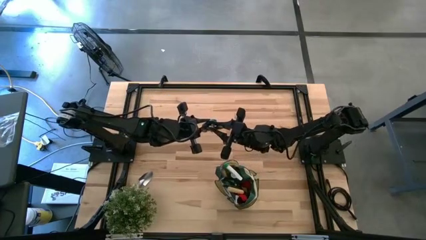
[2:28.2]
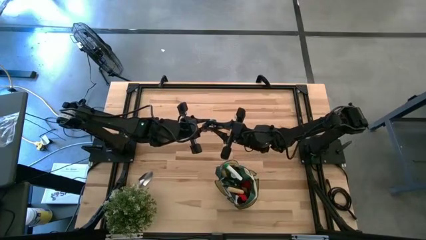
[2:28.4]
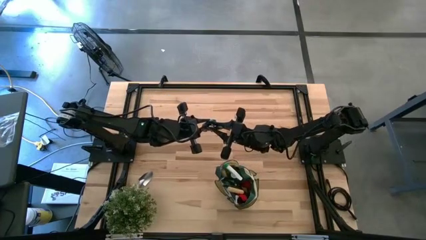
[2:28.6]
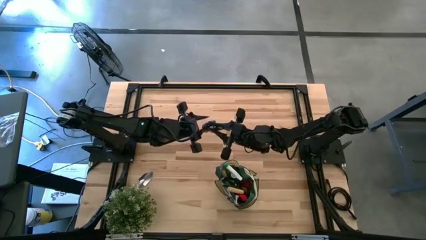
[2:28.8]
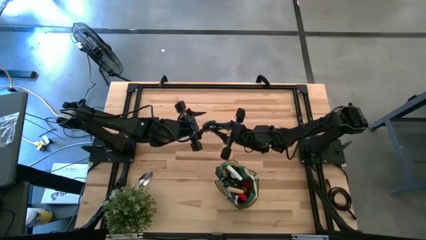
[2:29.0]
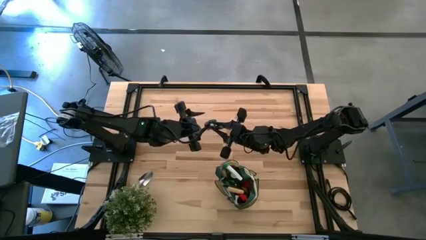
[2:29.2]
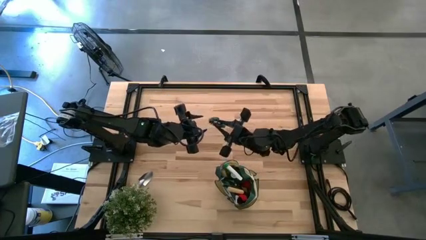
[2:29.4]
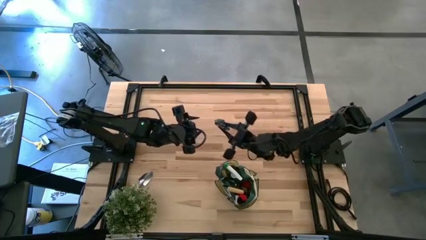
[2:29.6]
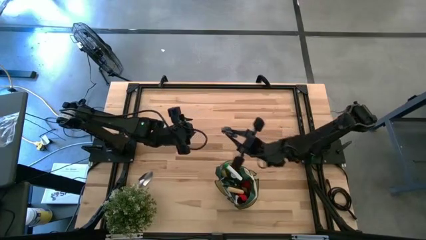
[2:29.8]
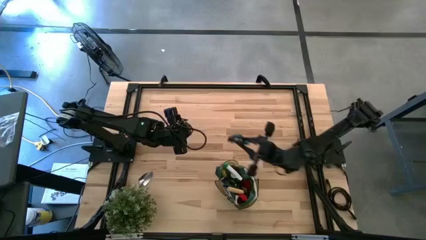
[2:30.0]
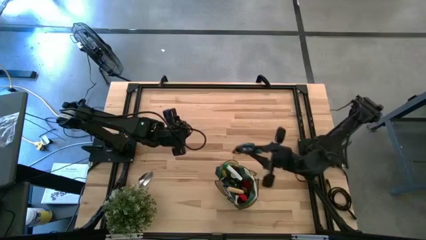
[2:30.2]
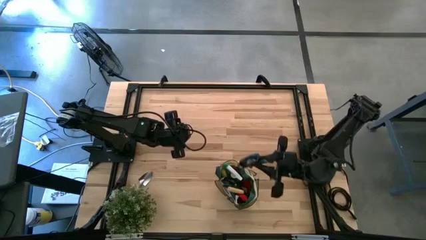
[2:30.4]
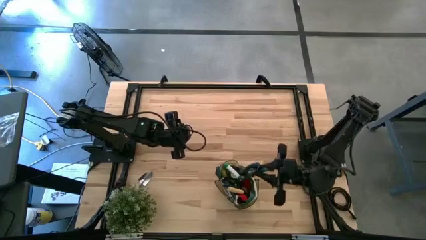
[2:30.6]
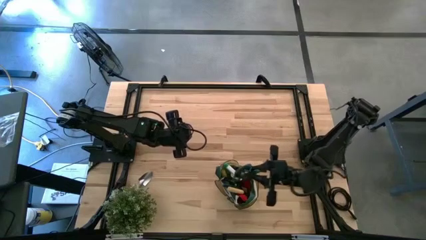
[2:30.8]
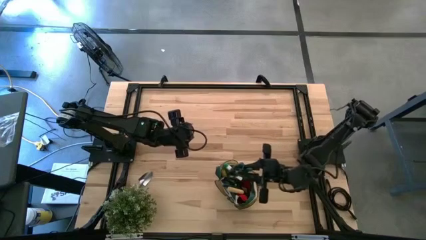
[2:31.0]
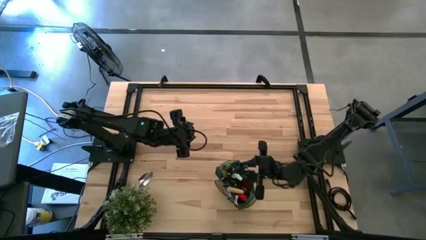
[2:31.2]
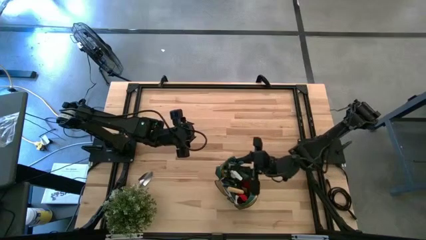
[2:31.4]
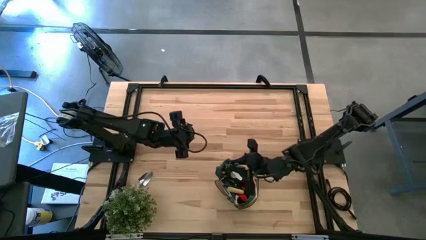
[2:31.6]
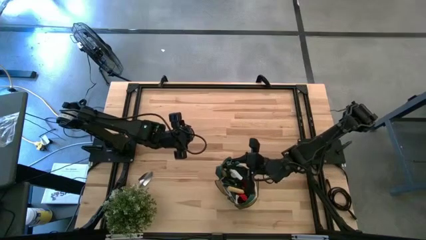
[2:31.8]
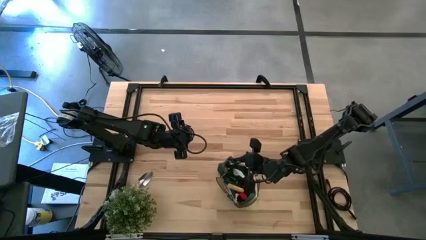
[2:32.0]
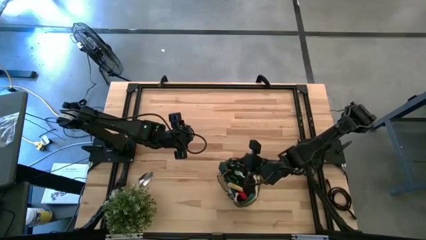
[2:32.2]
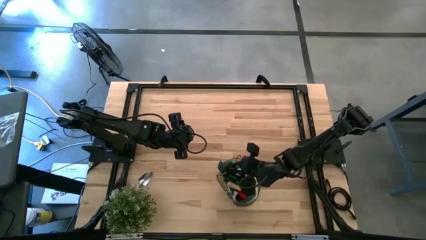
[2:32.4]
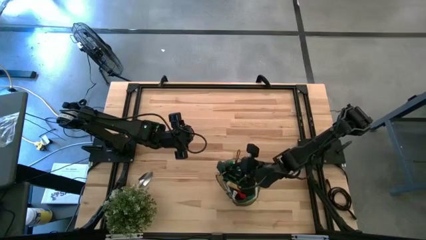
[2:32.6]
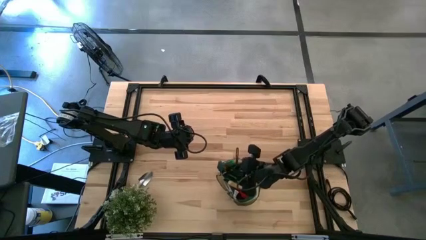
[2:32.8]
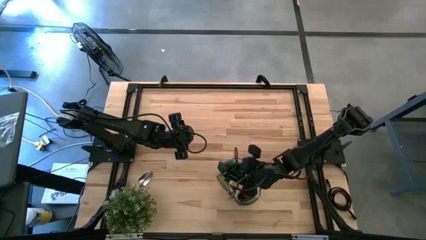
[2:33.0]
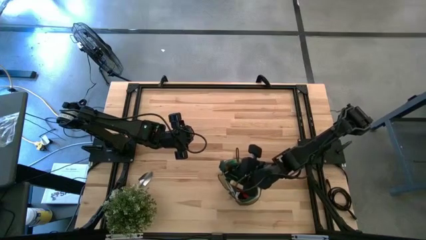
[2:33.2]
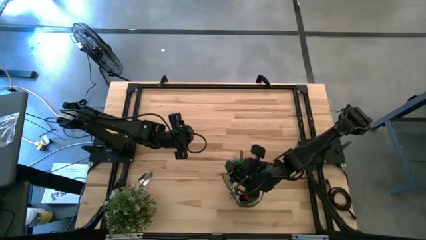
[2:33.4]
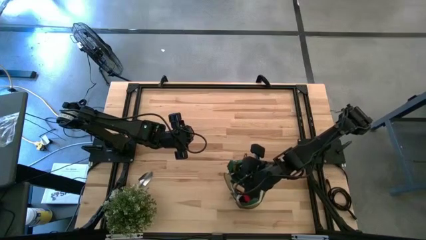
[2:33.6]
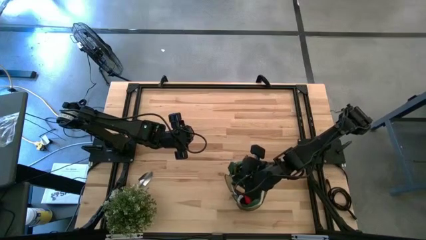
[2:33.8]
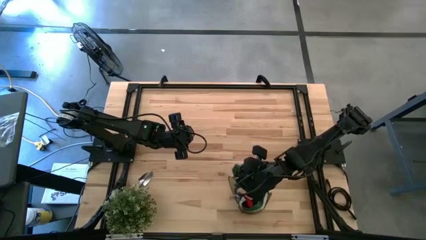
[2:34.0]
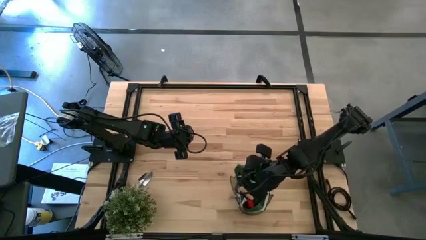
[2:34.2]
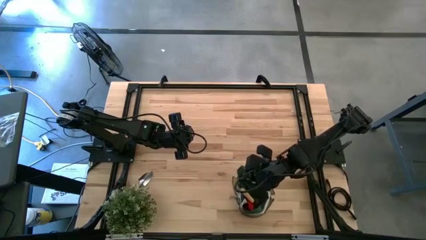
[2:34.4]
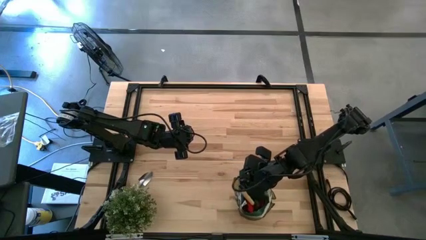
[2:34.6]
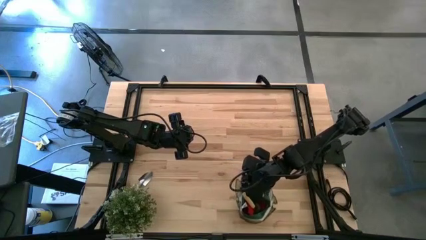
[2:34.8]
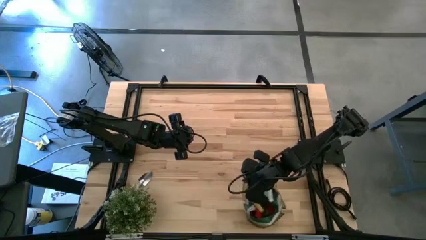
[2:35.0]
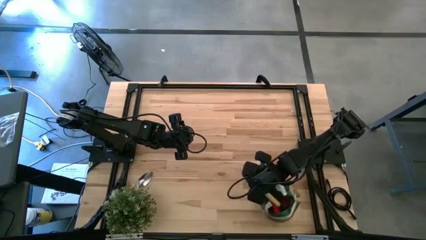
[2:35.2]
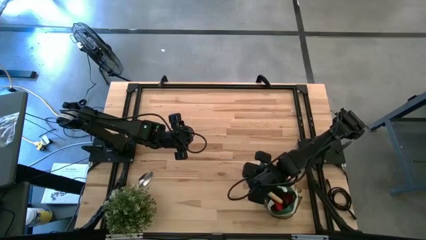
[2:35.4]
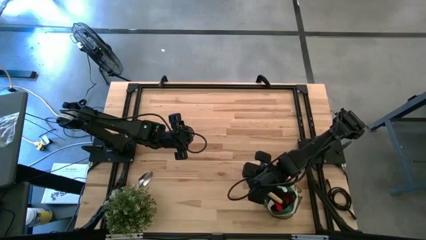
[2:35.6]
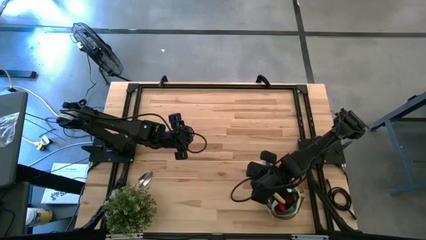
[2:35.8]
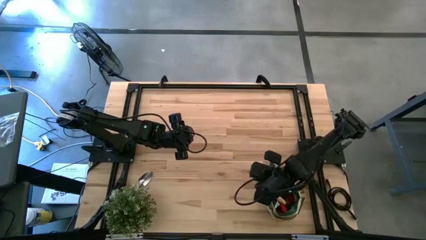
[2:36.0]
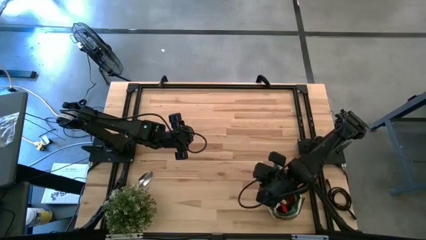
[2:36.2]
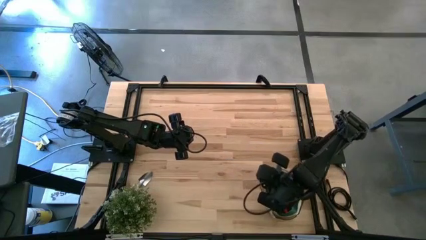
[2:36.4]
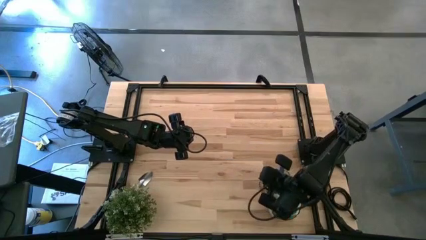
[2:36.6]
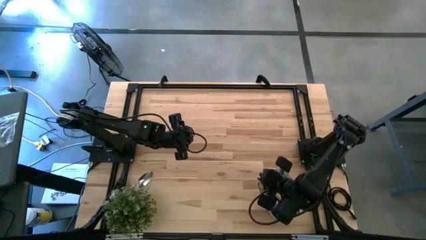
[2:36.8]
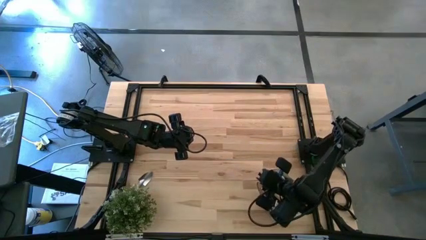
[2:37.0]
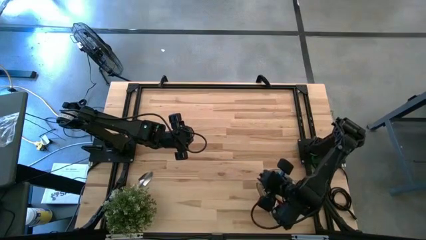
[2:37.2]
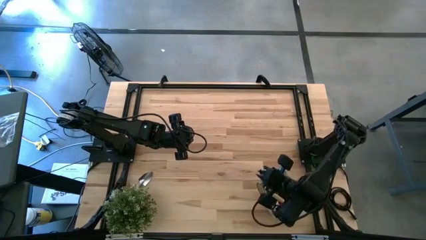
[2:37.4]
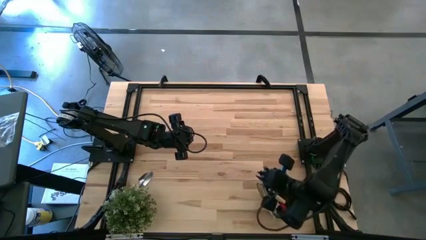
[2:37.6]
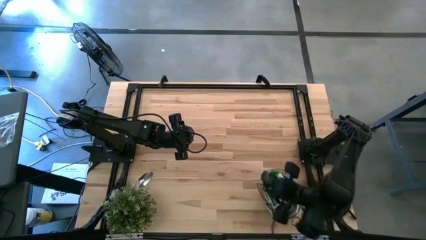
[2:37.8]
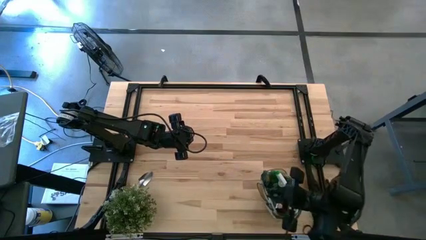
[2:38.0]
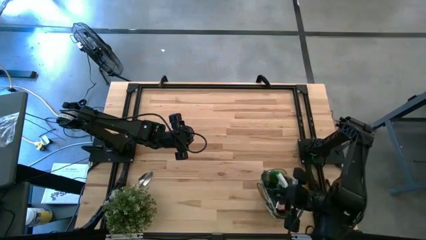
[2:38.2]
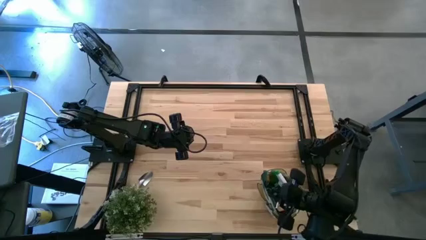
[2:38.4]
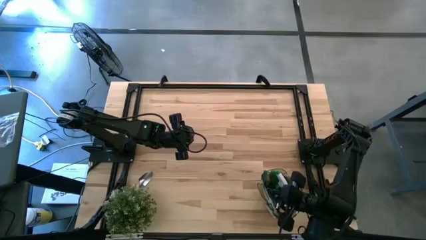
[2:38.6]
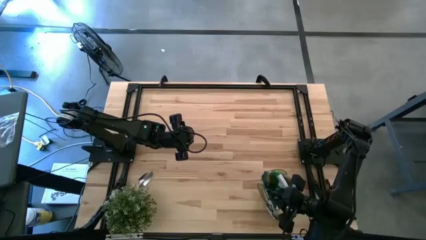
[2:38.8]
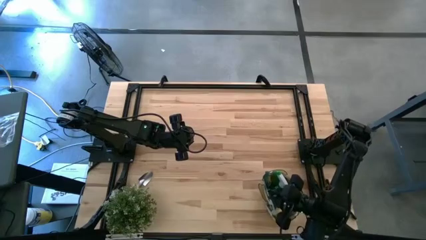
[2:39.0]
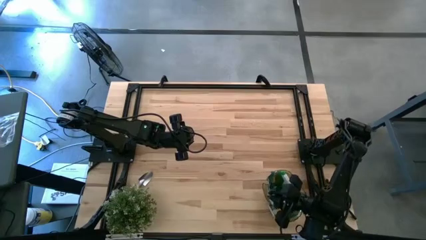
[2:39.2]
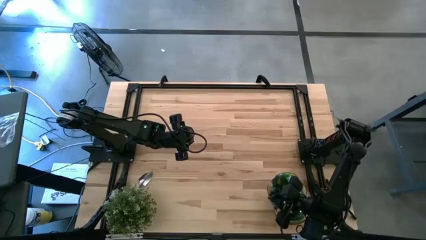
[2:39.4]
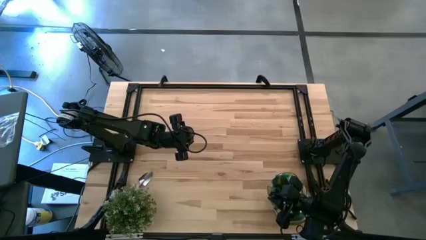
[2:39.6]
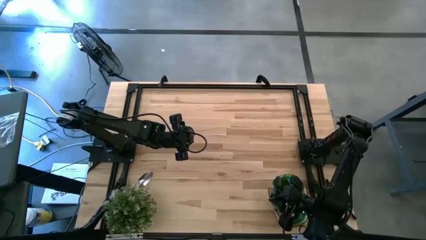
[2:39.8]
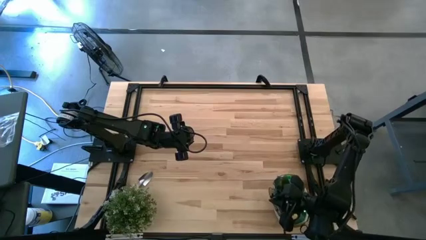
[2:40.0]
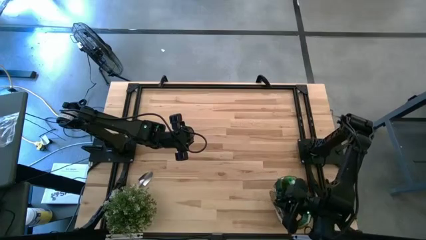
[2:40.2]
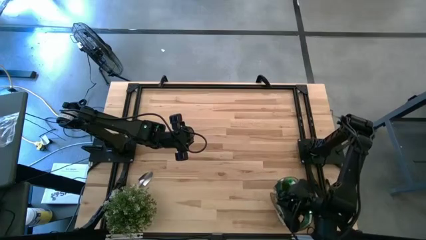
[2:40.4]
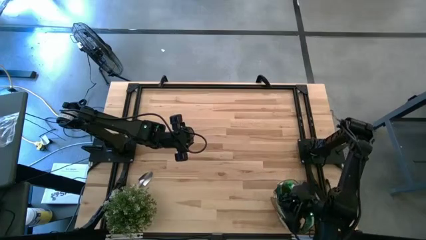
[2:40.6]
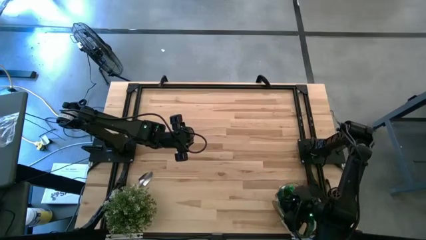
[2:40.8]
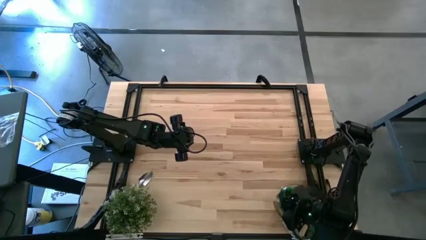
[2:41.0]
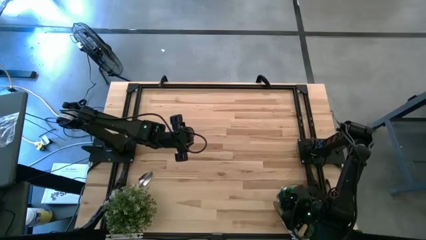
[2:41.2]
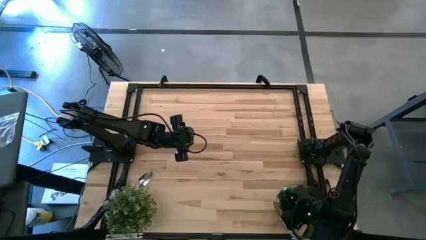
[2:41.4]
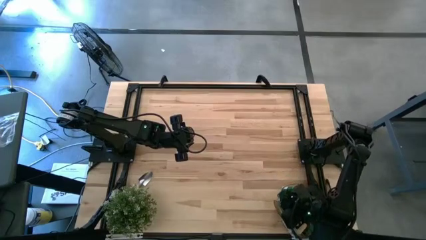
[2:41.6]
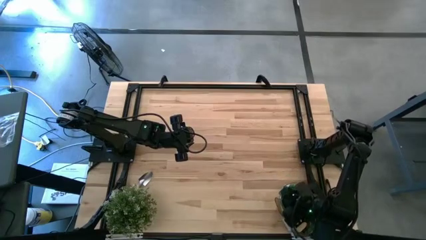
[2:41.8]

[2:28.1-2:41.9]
Task: Pick & Place Garden tools in Gardening bag
Put the green shear scissors into the green gardening bag

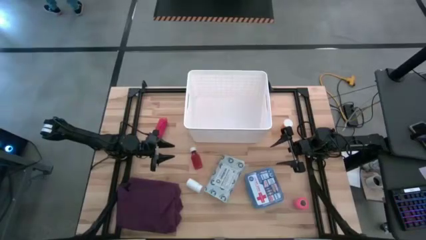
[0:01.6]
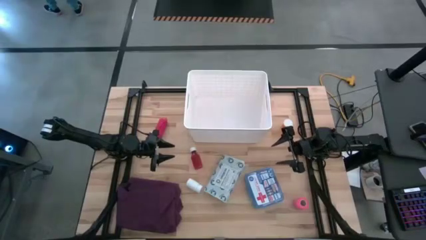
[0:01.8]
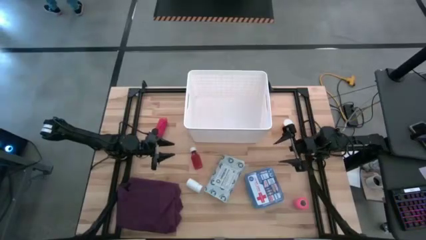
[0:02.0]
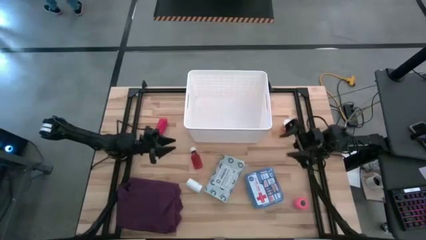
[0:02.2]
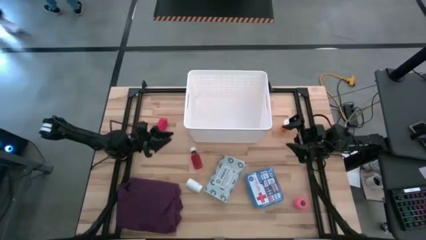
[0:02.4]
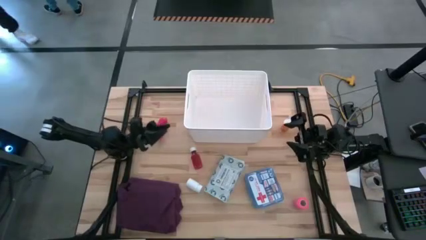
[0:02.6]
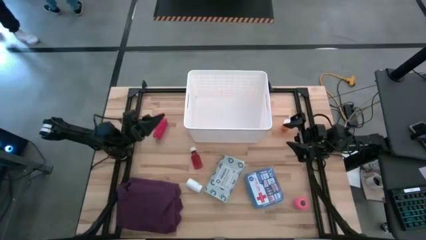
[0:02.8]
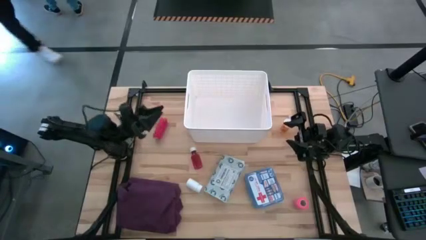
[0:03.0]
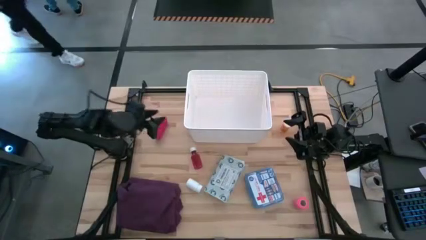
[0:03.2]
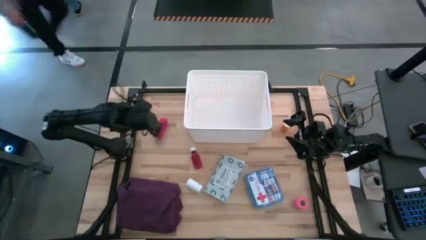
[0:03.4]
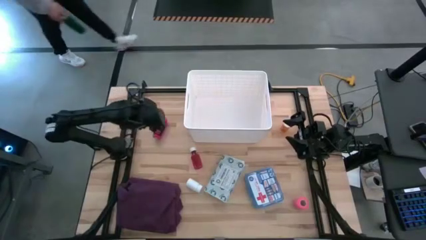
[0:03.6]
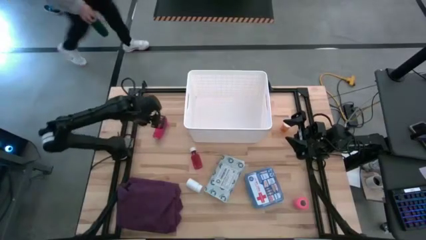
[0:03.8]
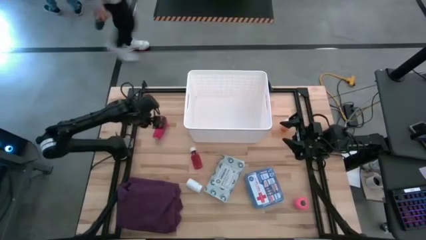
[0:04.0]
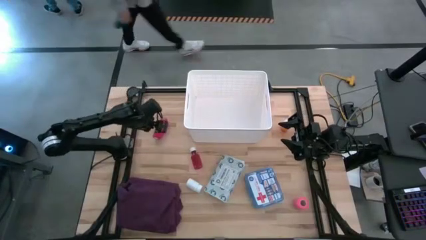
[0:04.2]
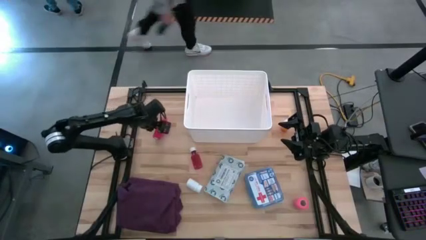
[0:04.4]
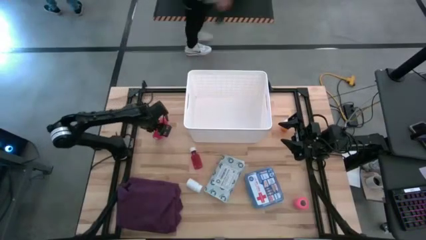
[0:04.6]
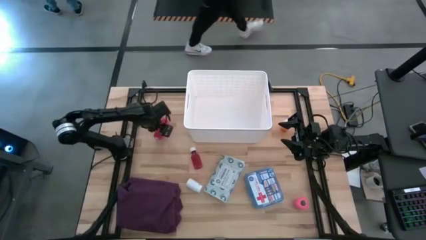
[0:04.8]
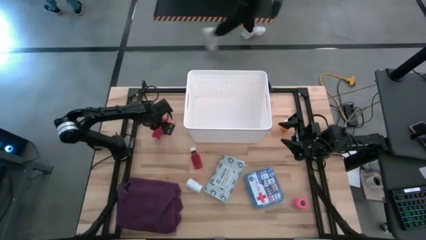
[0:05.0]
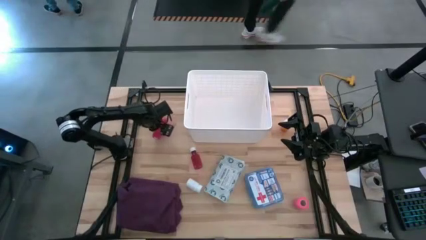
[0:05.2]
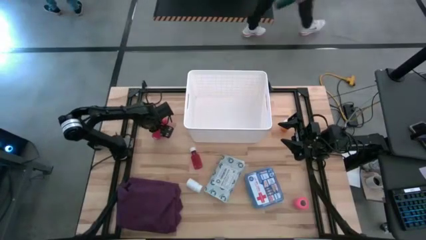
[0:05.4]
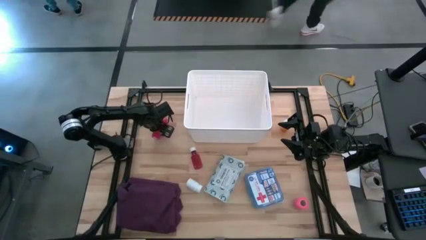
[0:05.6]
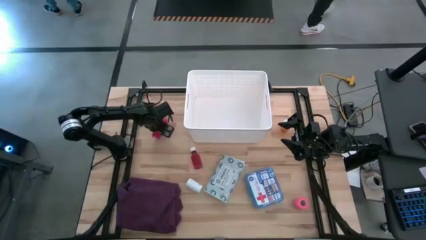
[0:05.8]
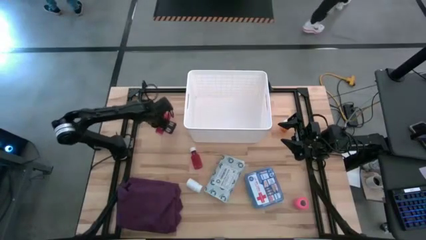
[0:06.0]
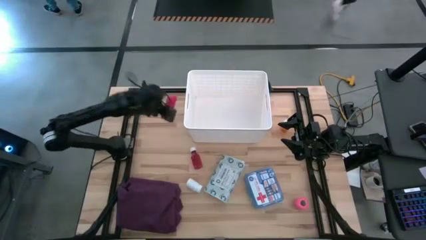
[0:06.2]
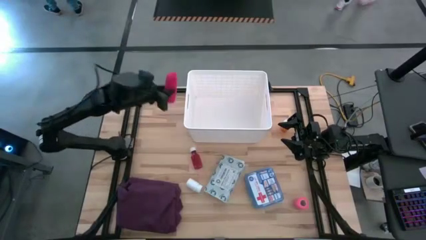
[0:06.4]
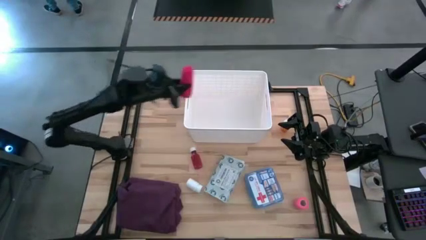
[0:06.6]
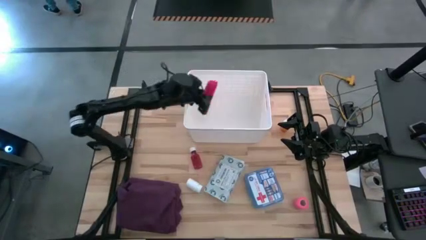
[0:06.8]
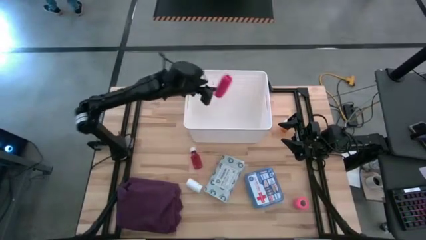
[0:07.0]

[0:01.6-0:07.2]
Task: Pick & place medical supplies in basket/bin
Put the red bandage into the white bin
